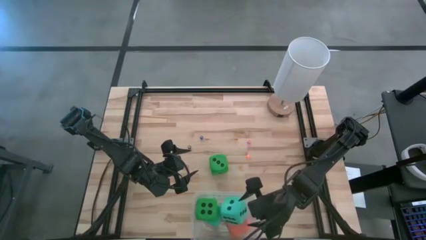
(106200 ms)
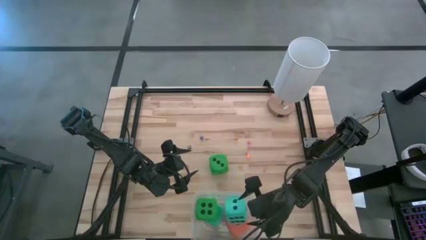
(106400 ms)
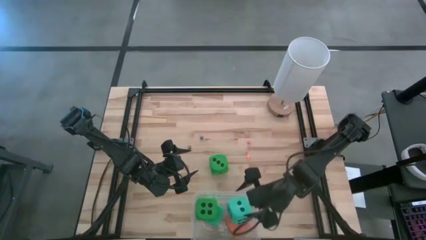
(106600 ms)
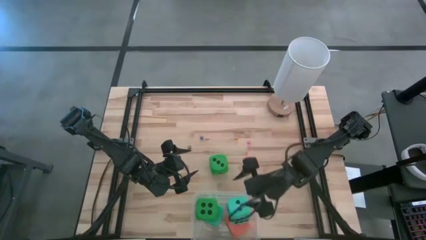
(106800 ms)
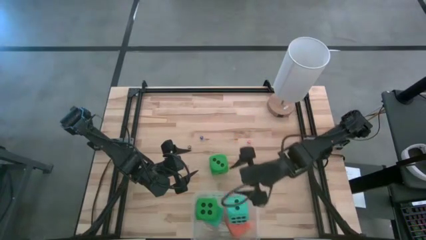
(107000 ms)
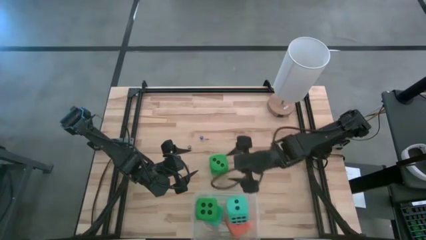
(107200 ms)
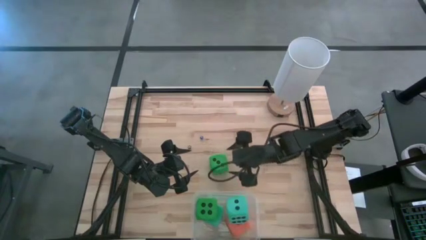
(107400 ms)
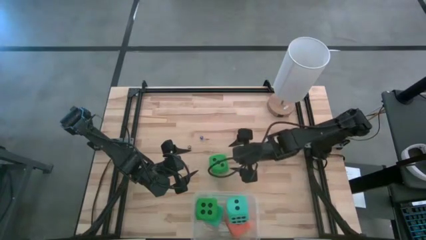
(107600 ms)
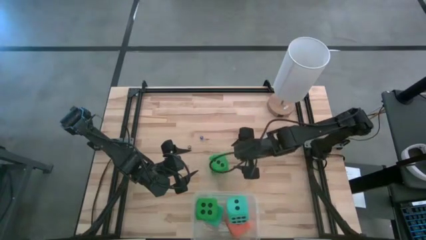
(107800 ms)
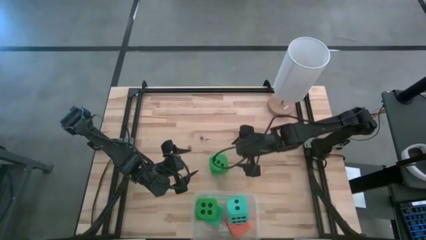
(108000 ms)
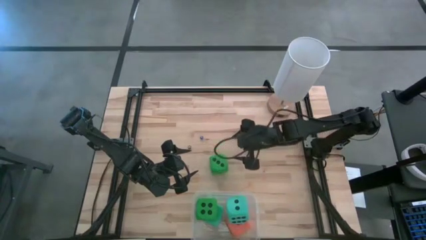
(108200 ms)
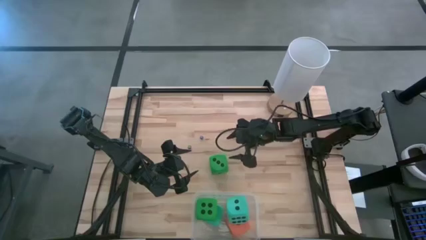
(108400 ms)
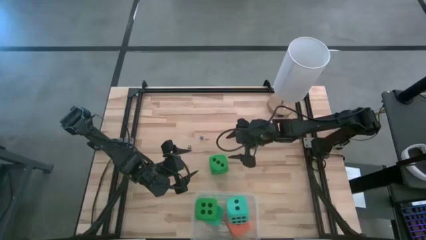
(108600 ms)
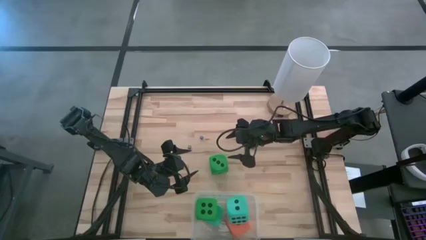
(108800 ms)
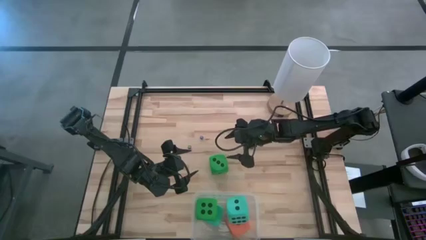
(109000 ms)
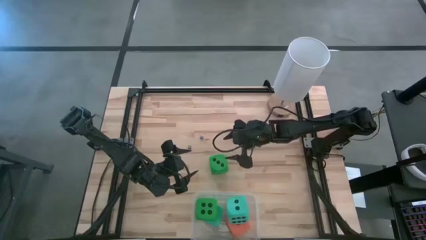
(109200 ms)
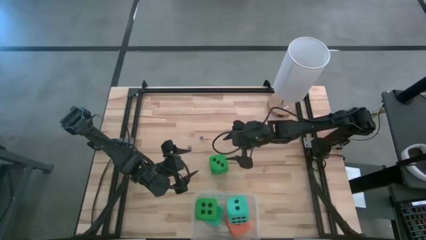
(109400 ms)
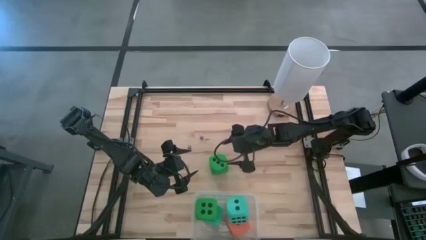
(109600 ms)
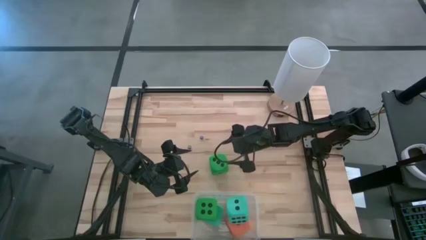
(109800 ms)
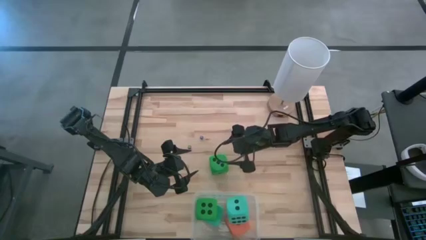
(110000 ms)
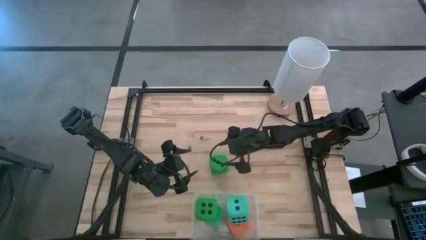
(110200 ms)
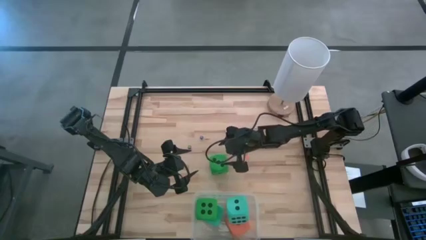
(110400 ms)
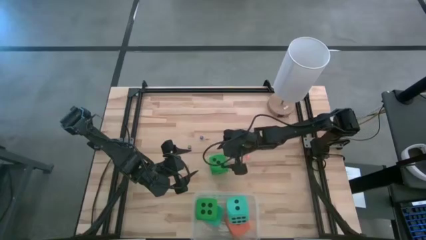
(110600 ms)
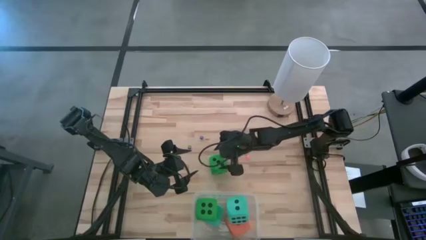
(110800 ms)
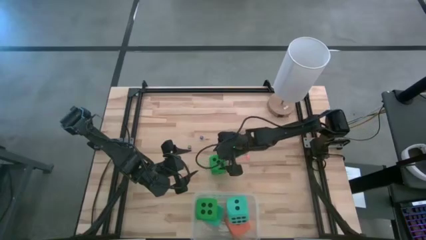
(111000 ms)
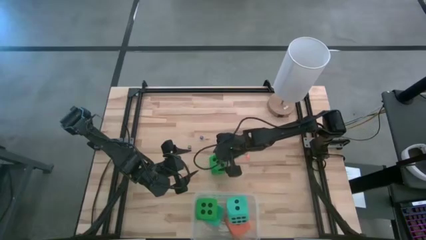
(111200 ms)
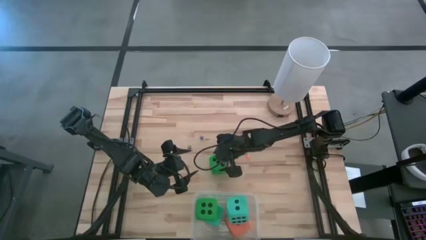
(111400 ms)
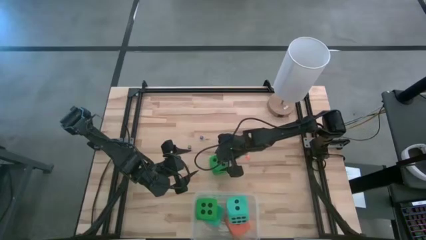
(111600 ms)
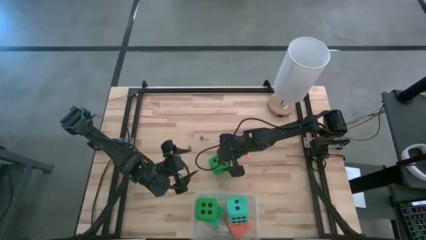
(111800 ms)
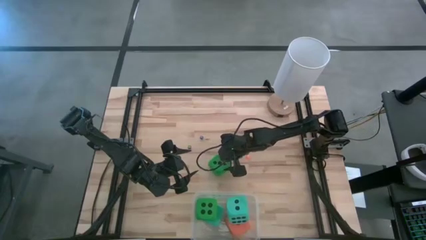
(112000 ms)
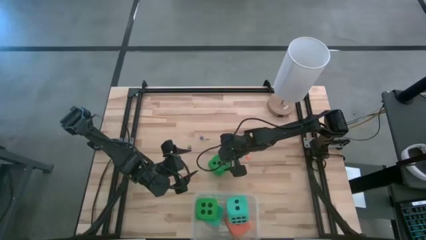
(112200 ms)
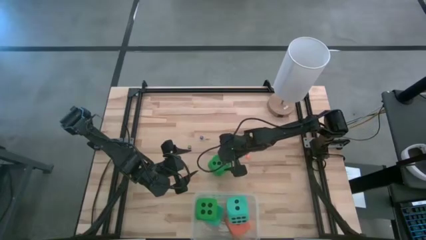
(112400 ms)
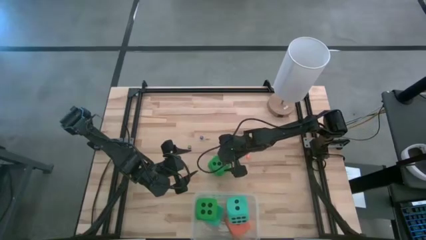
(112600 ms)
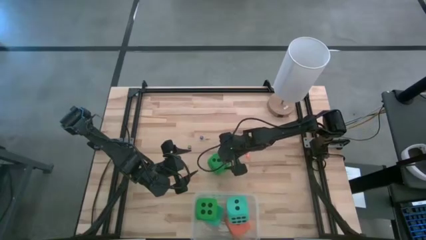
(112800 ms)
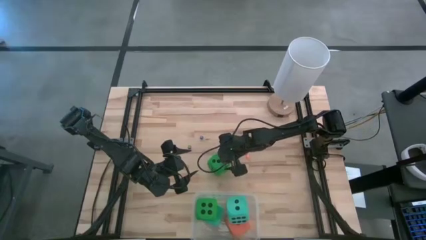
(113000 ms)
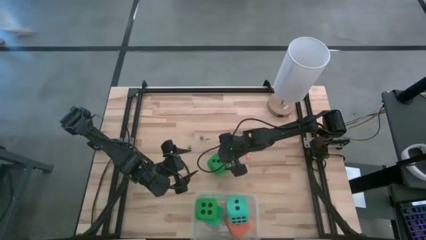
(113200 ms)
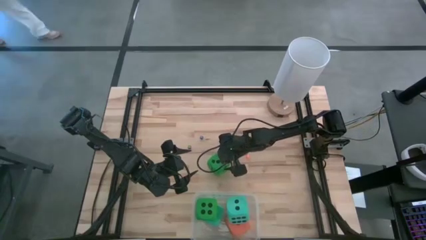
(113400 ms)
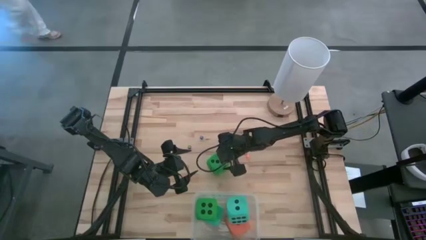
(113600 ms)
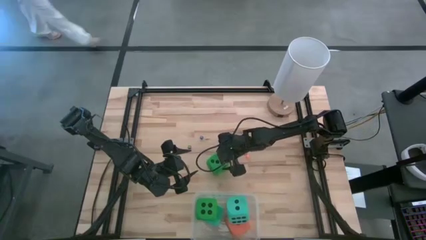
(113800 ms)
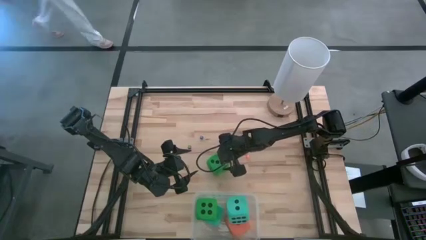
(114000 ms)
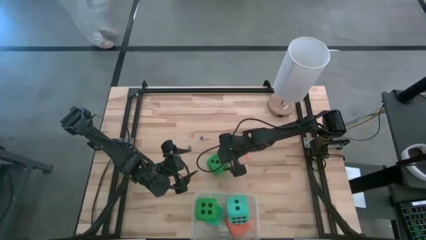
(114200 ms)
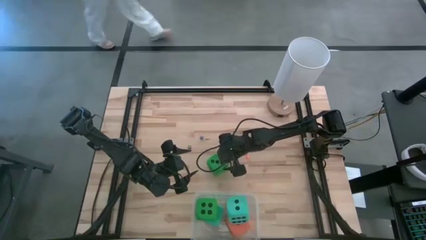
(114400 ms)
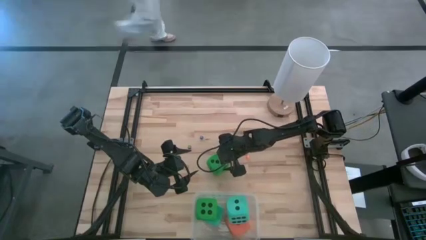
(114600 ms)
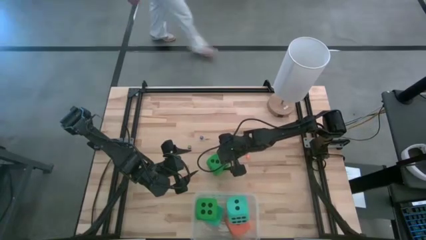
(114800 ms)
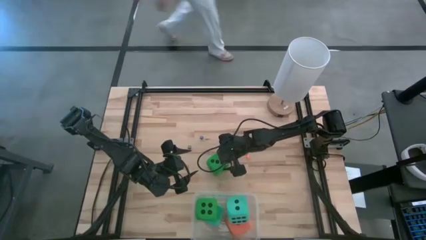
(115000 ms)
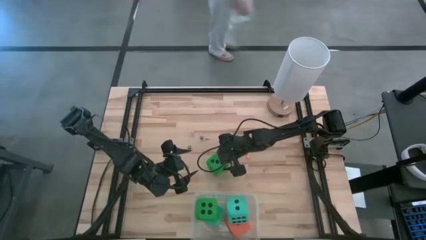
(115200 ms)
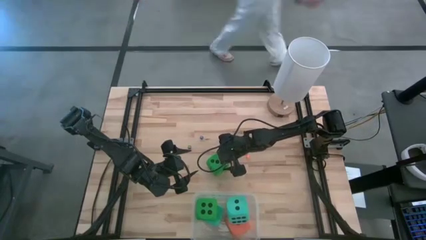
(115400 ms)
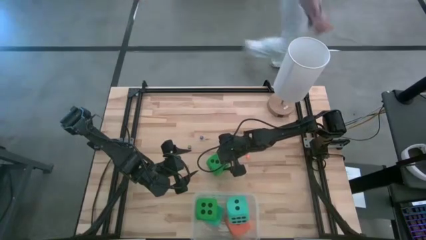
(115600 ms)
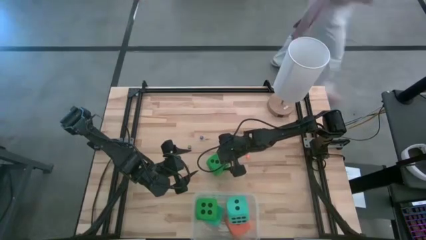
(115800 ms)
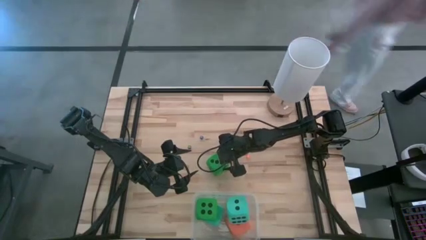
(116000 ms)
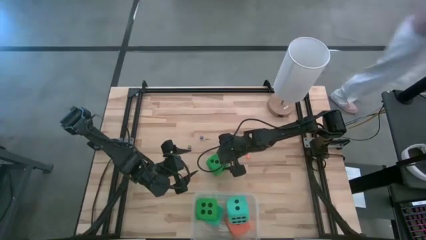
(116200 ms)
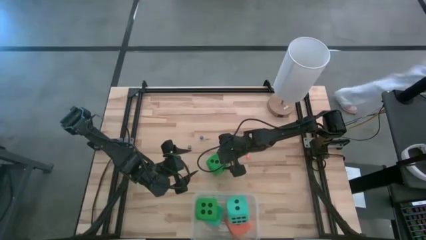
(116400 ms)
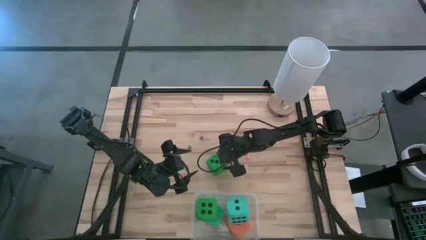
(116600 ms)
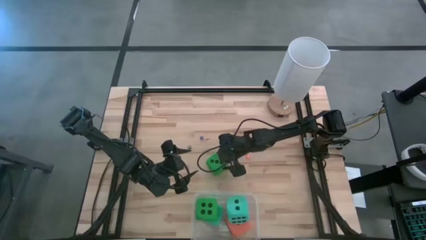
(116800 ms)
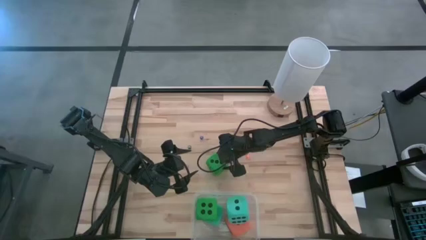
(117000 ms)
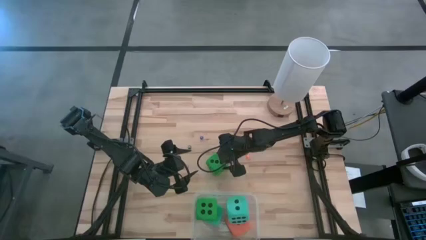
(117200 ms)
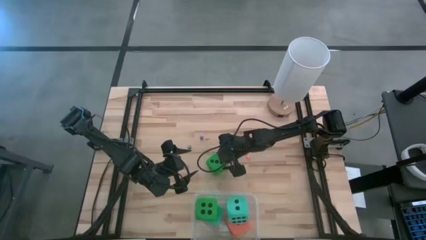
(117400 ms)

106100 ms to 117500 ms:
Task: Pick & Place Dice
Put the large green dice into the transparent bin

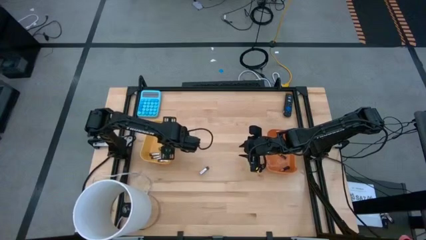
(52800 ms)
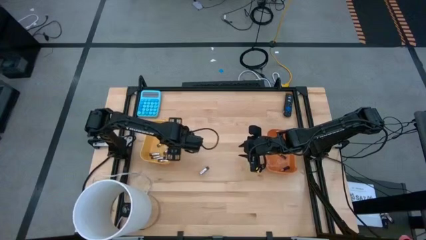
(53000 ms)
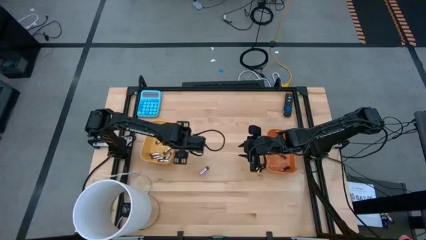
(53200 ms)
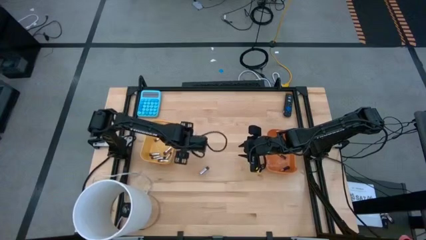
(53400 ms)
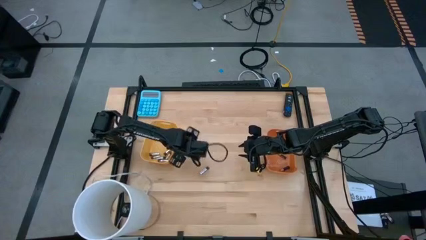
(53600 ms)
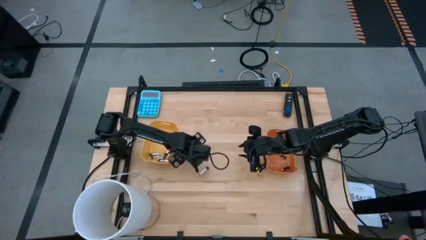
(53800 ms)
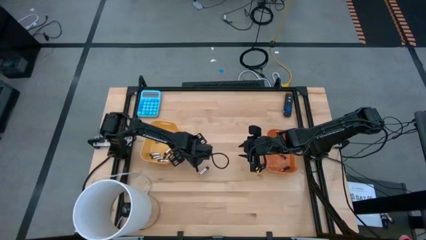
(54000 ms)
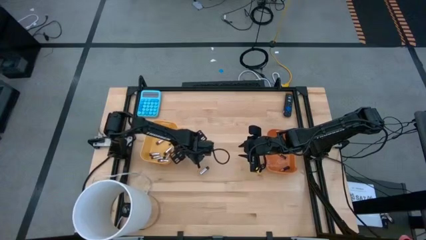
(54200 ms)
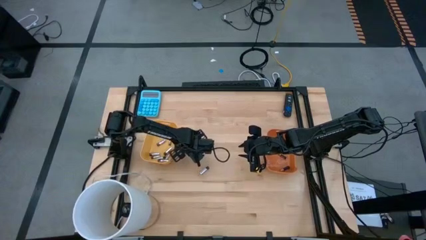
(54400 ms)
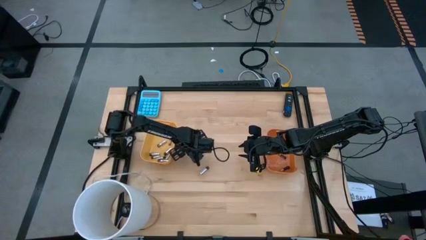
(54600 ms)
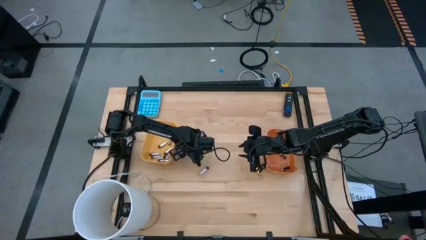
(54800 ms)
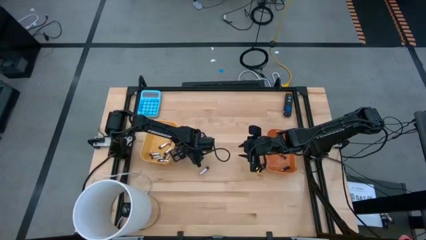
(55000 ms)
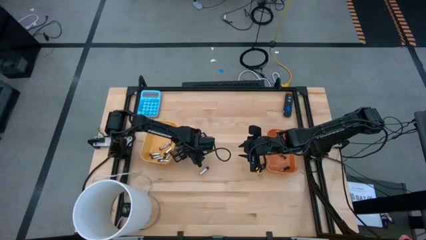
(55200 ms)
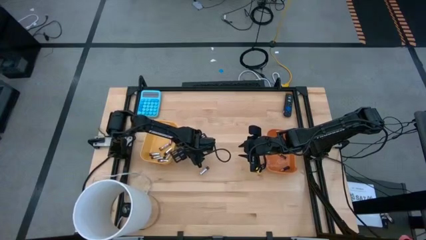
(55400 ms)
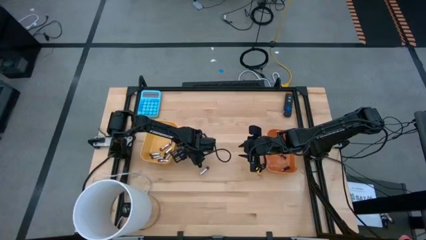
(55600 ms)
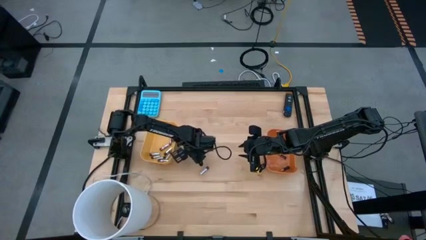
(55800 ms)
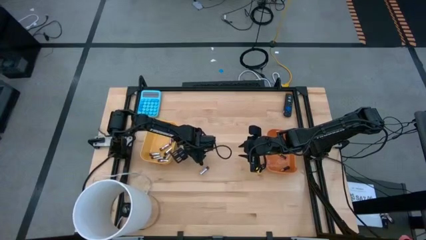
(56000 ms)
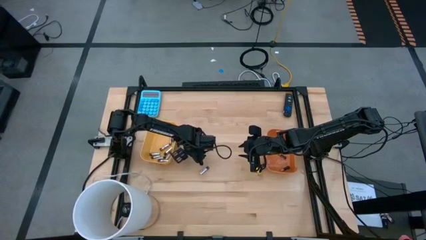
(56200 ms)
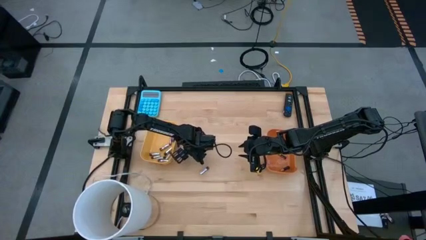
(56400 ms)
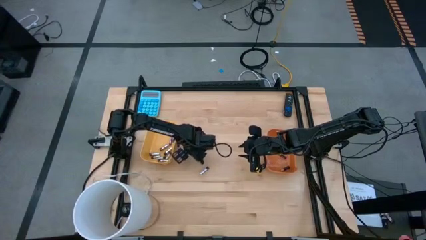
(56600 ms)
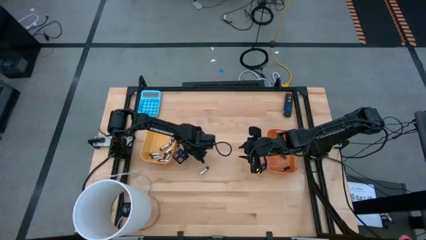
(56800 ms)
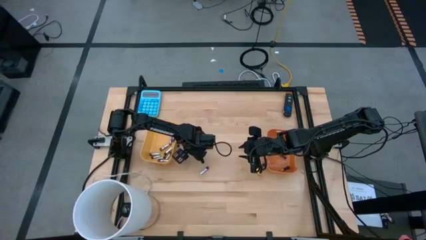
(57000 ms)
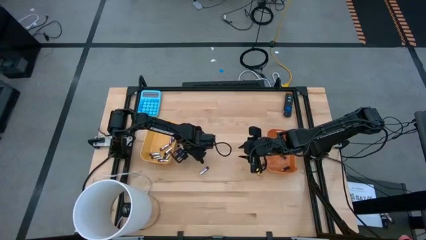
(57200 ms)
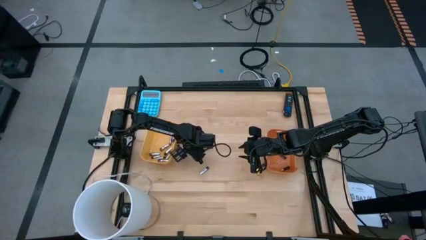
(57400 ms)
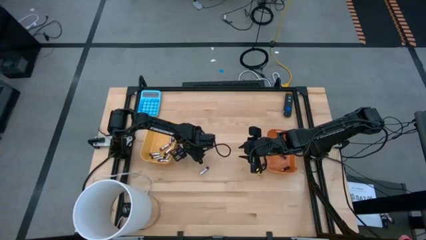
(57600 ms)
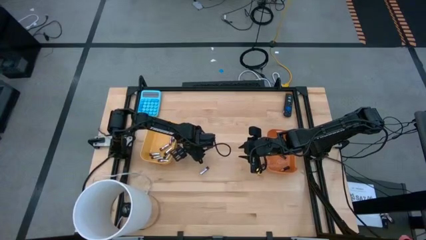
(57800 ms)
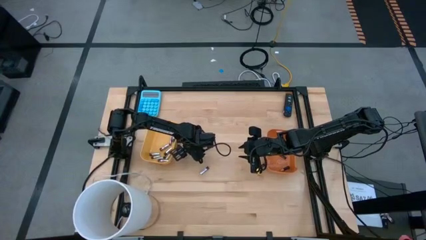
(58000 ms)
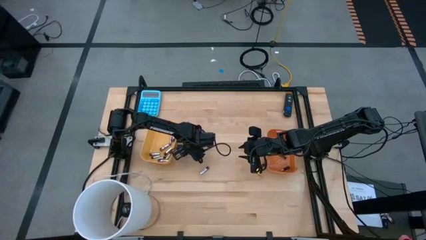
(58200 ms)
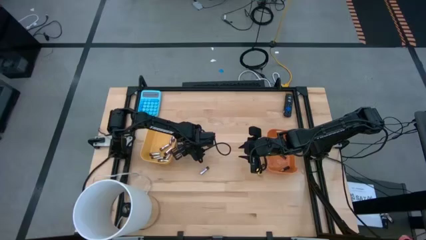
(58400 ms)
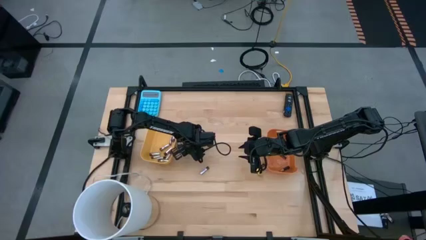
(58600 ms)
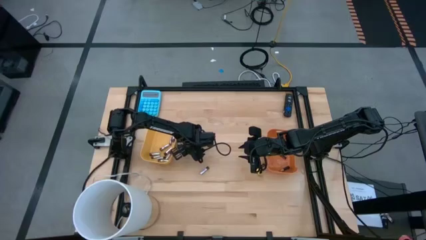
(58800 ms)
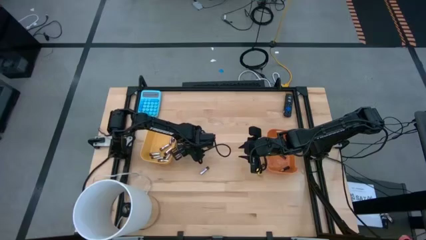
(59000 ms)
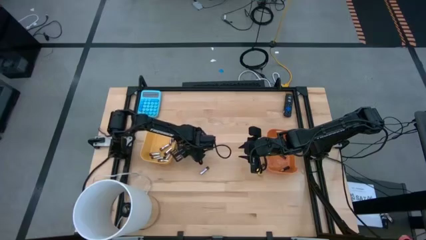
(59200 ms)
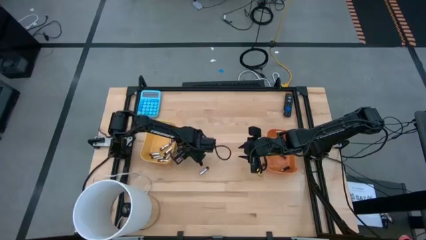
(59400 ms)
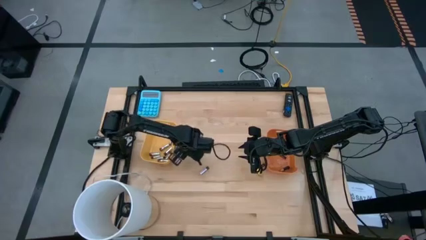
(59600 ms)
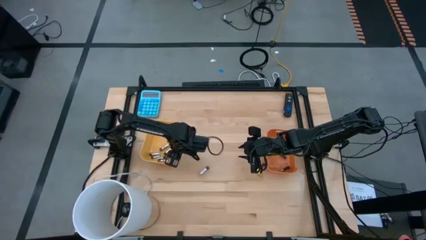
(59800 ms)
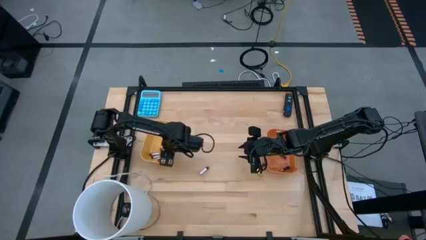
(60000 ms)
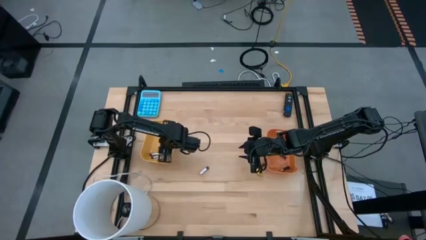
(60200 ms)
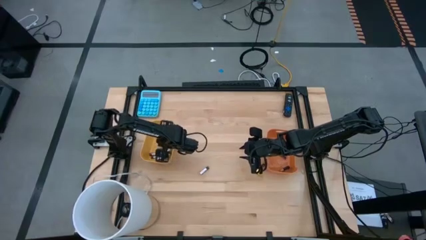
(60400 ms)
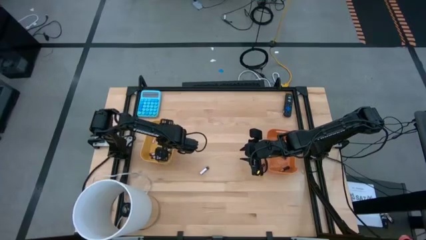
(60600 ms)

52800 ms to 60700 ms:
Task: Sort batteries
Put the silver battery into the yellow bin
